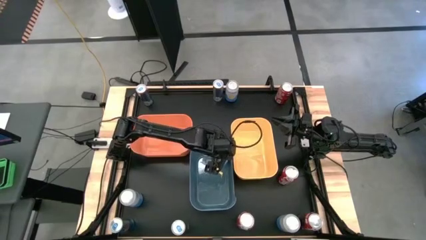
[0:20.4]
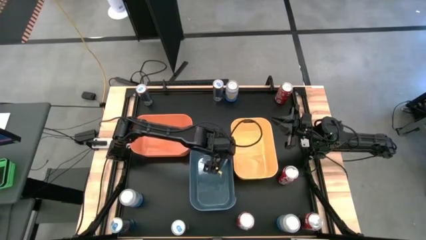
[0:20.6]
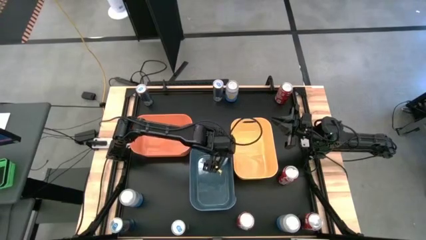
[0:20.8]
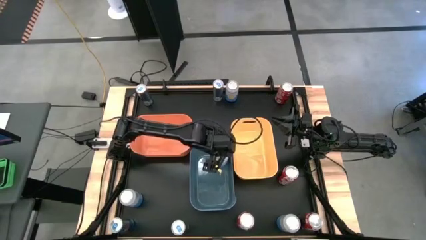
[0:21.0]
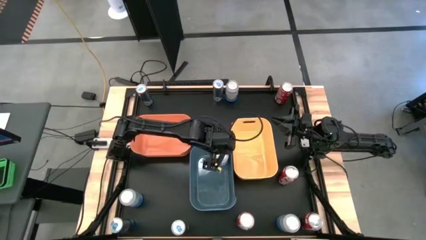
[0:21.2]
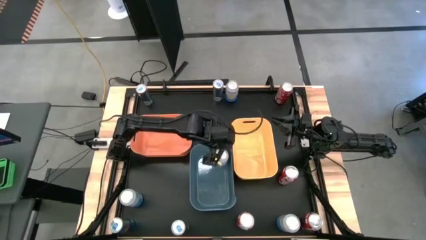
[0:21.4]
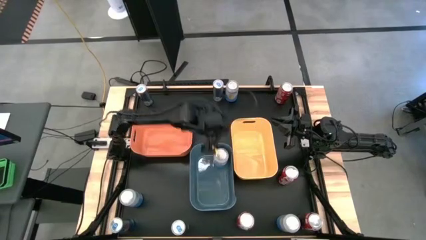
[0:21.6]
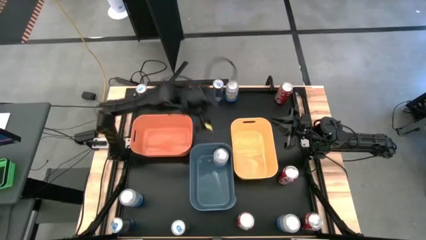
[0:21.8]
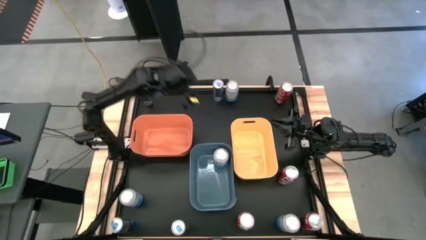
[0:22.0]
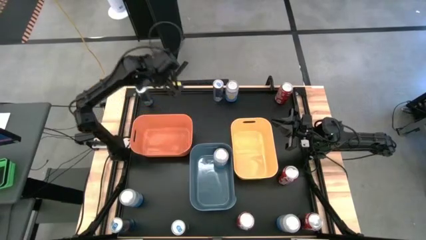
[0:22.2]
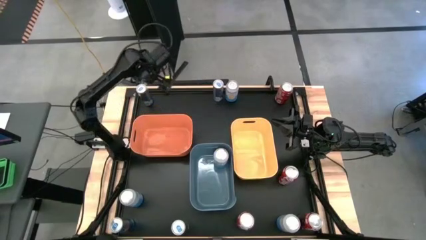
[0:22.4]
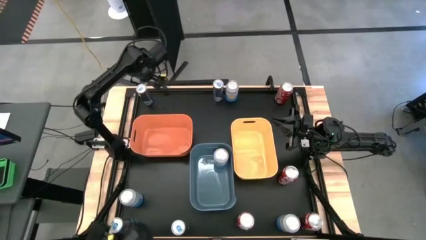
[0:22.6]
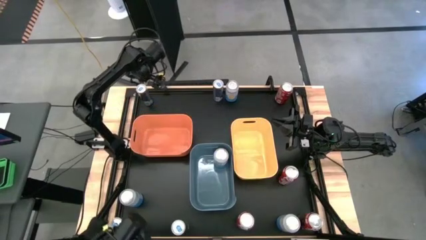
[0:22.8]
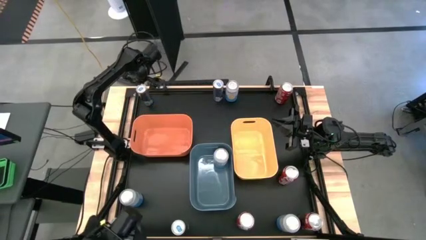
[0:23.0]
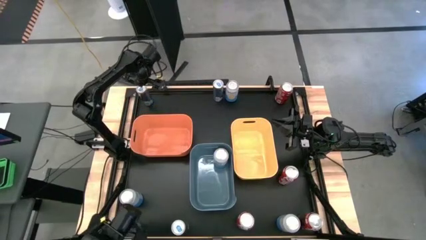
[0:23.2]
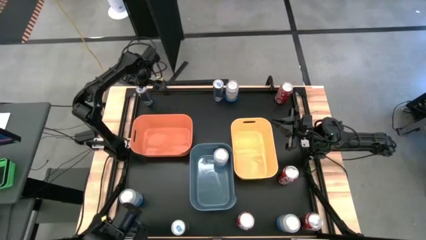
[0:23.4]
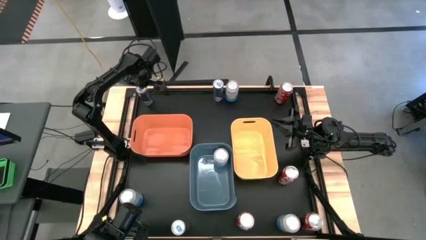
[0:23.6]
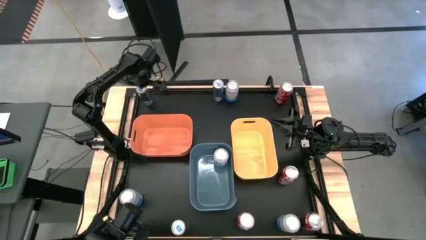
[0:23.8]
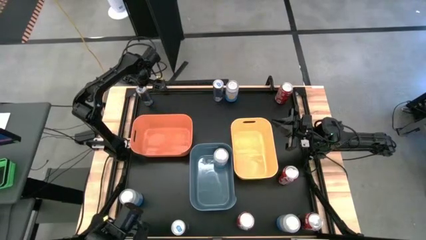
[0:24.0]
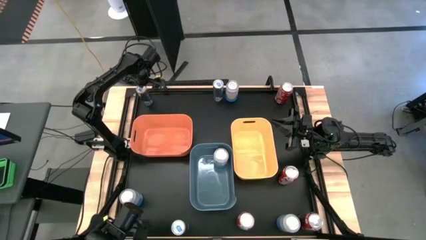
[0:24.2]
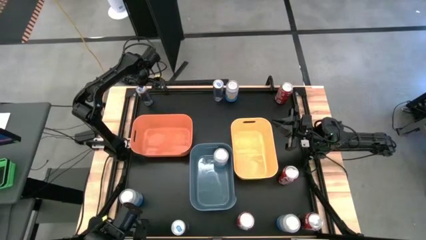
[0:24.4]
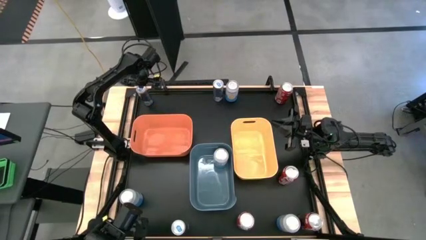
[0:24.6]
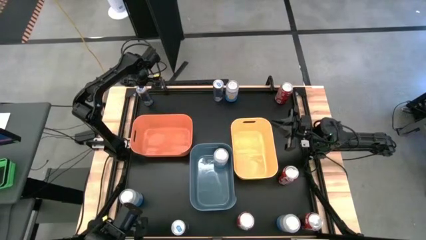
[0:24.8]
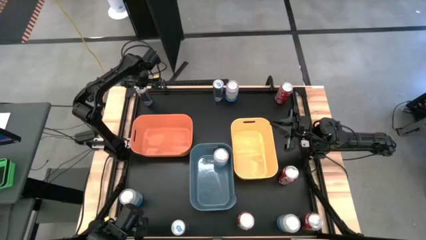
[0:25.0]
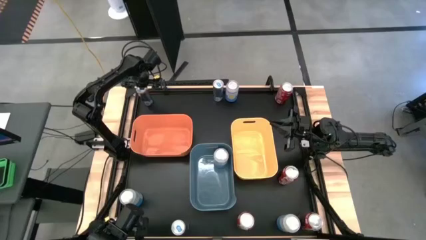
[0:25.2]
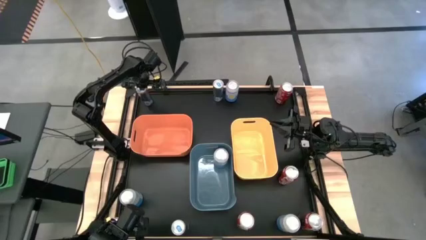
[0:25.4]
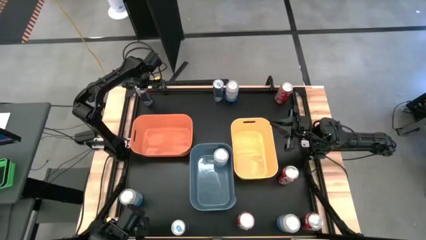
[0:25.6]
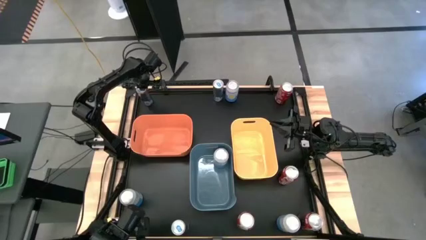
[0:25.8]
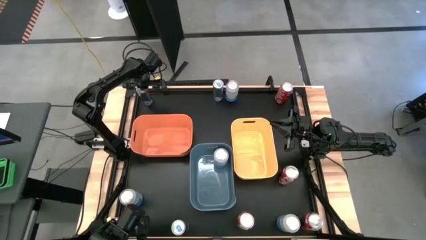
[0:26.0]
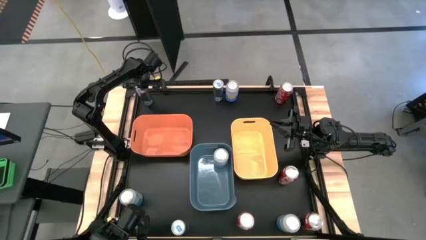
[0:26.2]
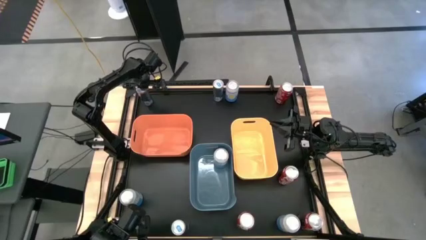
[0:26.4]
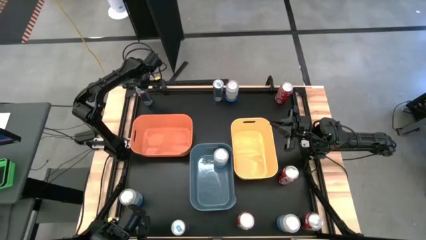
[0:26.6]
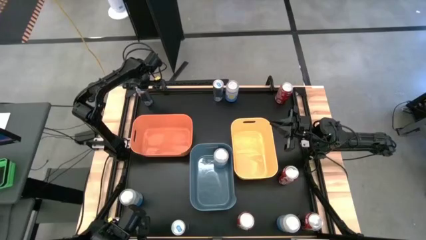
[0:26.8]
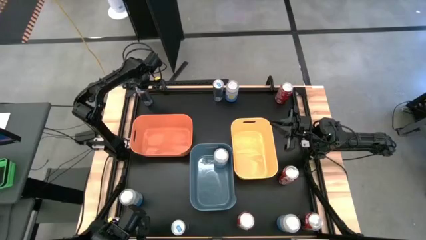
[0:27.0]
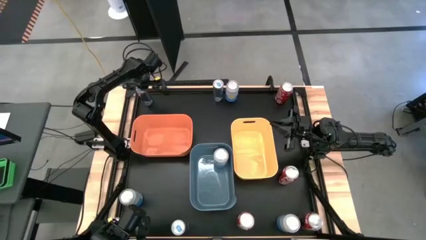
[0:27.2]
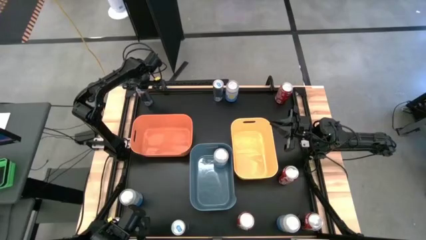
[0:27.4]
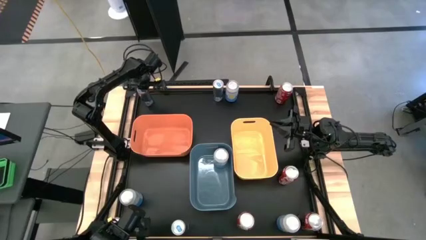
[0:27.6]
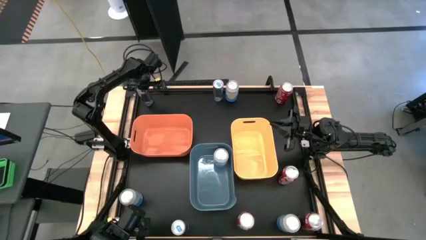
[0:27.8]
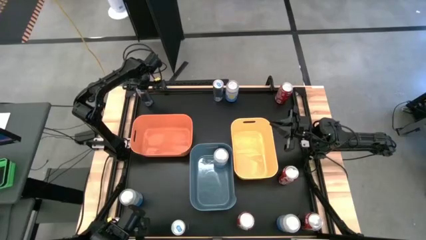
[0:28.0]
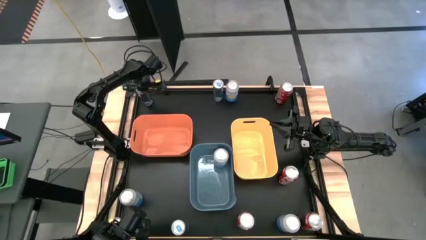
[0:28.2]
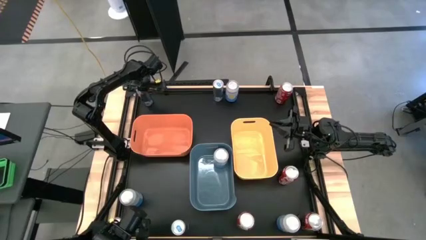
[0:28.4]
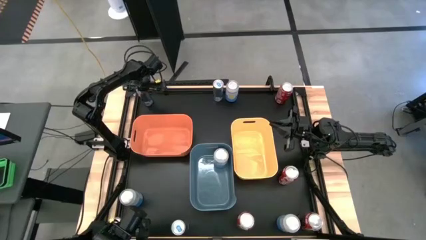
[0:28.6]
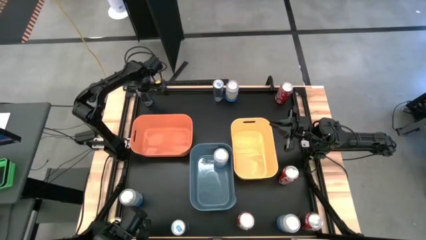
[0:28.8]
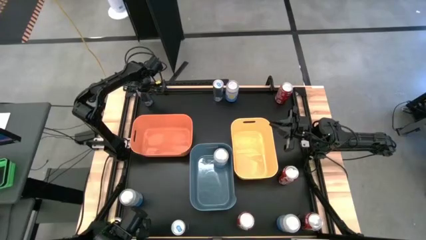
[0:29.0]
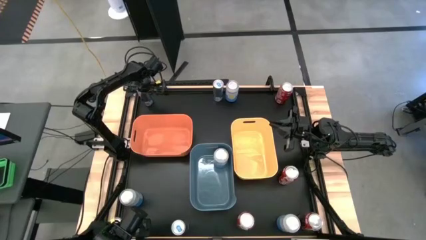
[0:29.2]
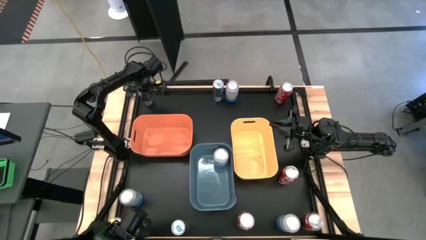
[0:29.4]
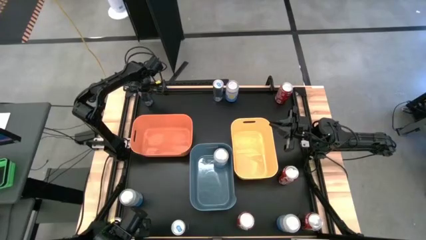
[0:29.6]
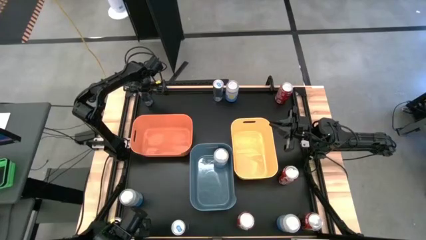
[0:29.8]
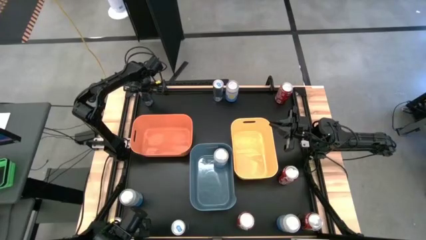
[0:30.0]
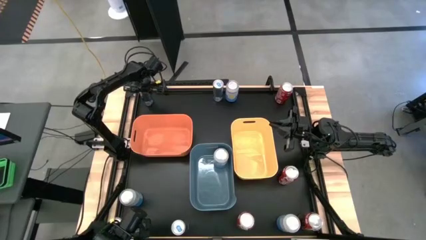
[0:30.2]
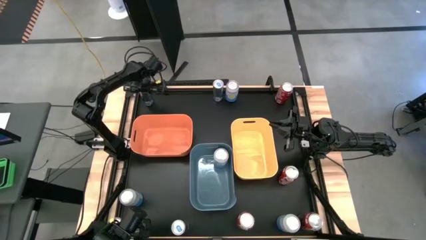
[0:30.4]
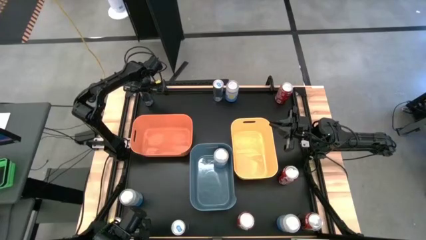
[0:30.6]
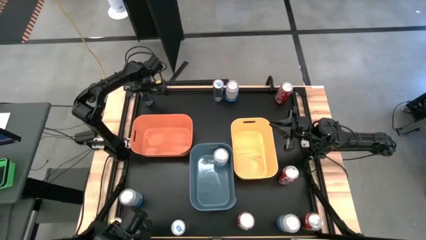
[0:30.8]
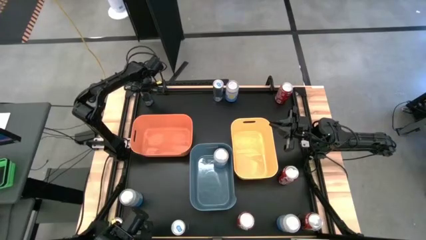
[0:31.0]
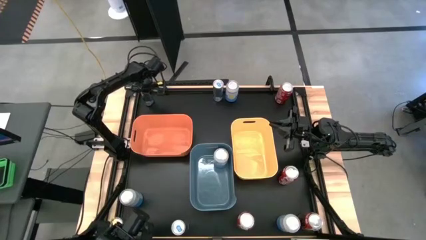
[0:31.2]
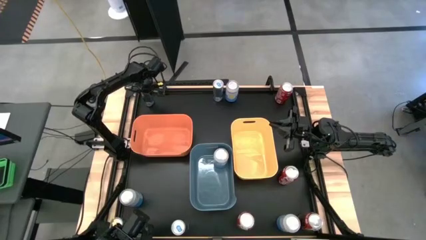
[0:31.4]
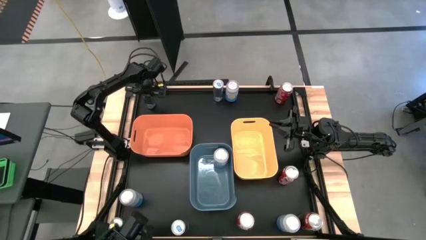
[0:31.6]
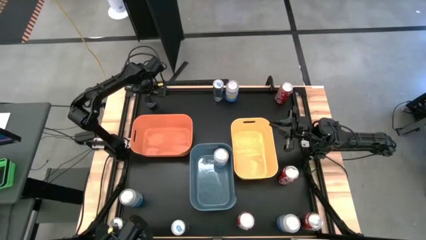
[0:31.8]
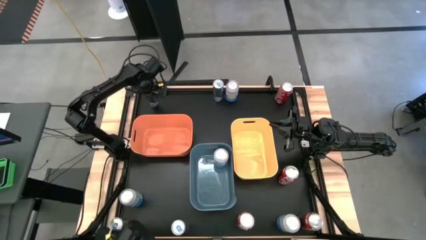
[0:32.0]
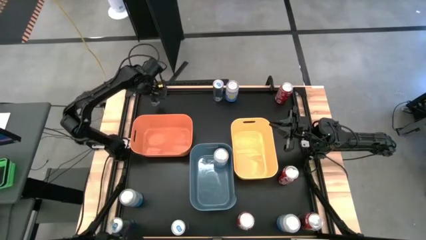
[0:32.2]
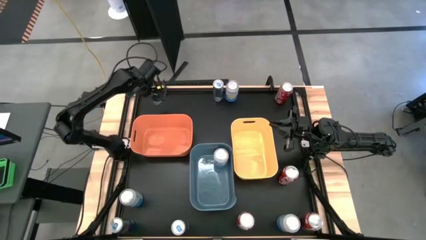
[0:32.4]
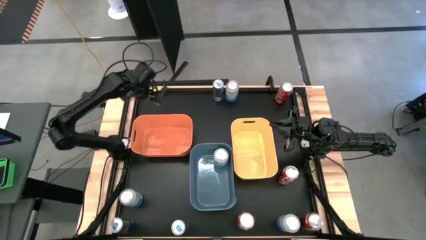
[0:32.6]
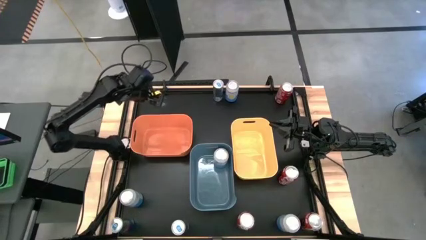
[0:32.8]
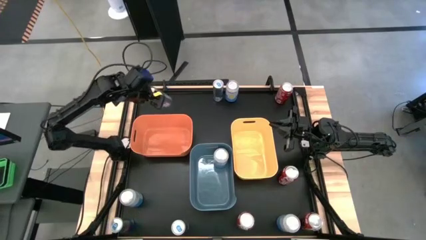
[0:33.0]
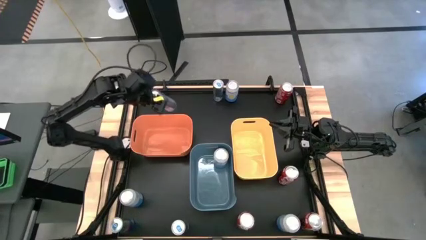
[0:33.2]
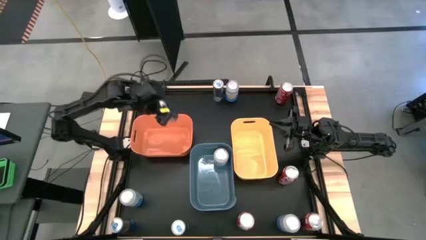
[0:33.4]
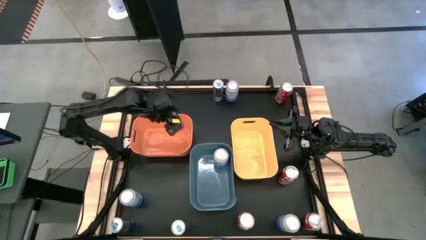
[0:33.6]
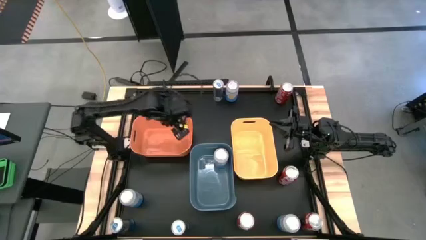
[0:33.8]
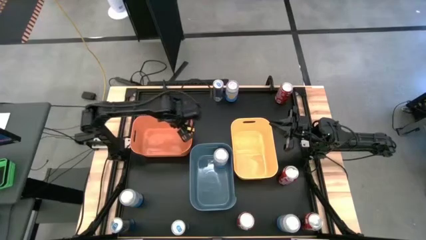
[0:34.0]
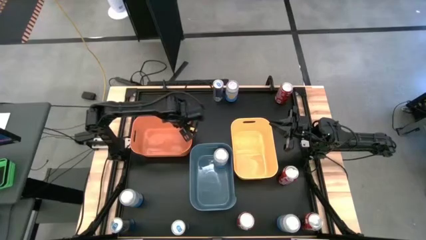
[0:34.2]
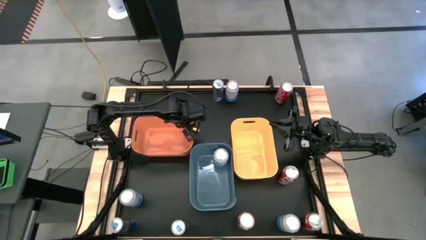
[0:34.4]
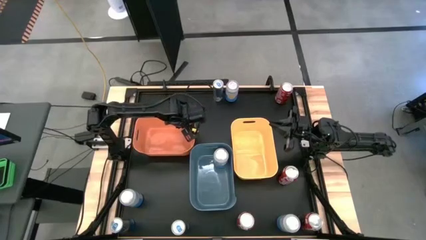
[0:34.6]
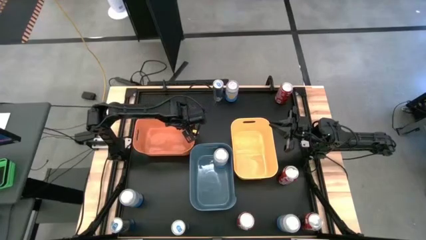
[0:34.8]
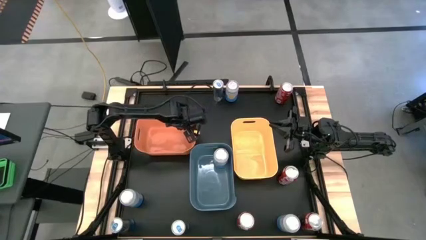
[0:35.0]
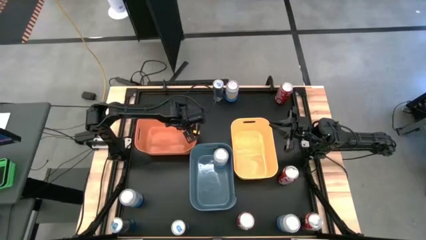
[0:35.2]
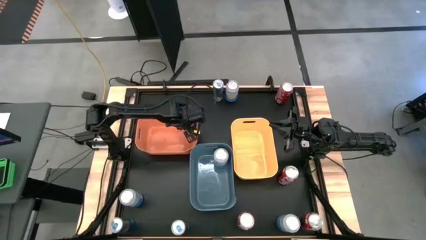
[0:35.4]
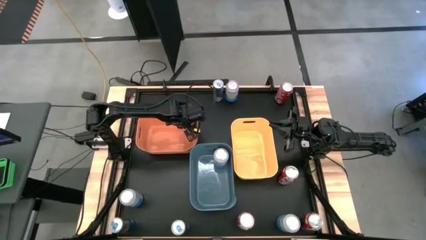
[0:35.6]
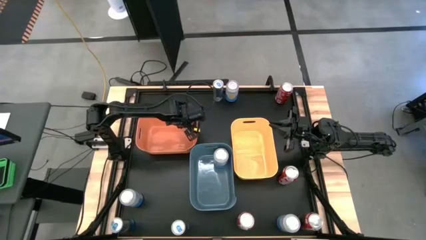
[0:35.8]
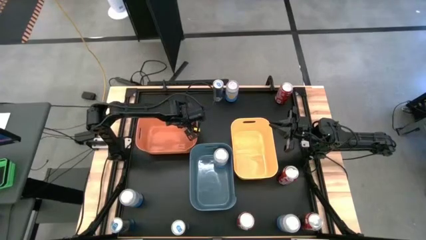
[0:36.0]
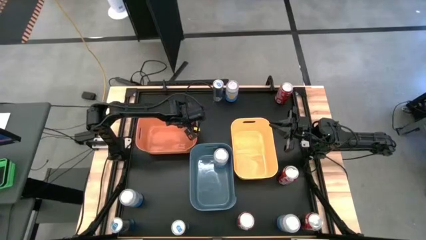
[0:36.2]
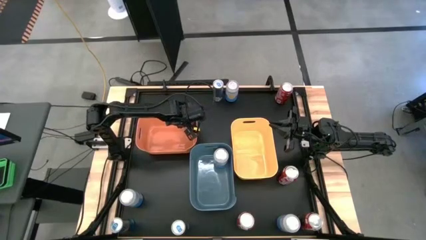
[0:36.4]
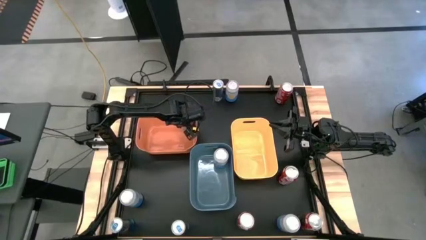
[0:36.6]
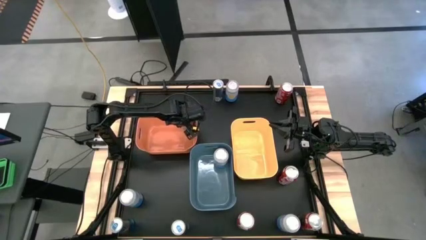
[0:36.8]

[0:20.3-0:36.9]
Task: Sort soda cans
Put the top left blue soda can into the orange bin
